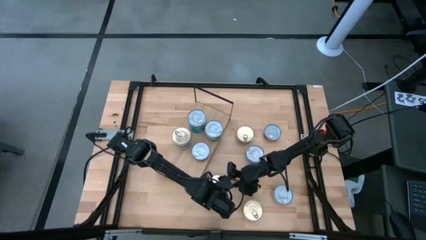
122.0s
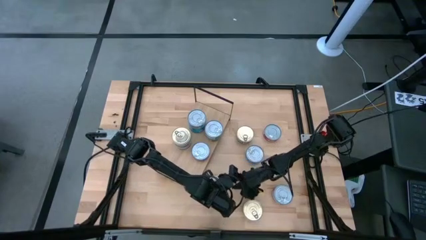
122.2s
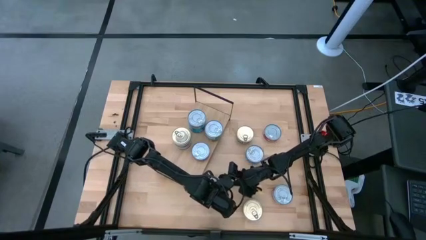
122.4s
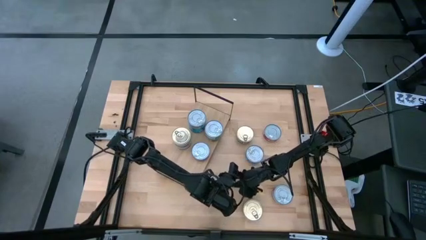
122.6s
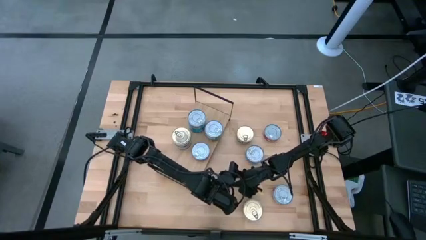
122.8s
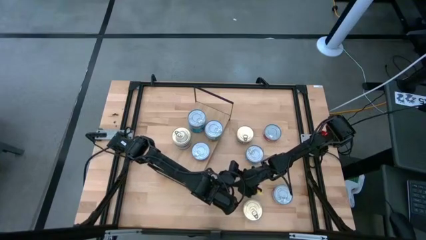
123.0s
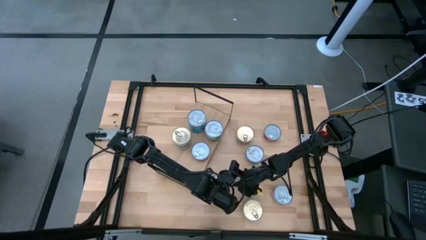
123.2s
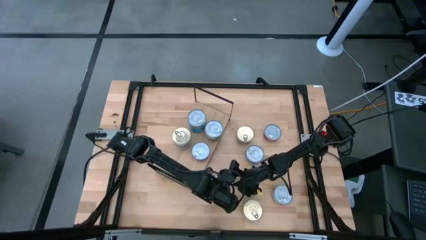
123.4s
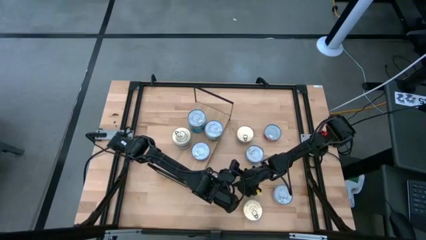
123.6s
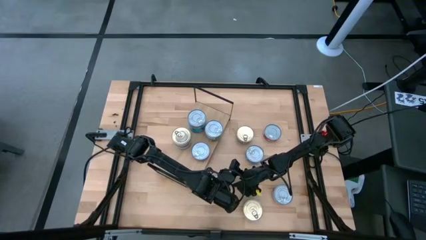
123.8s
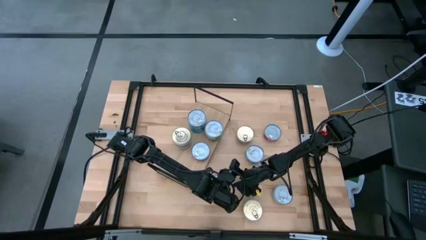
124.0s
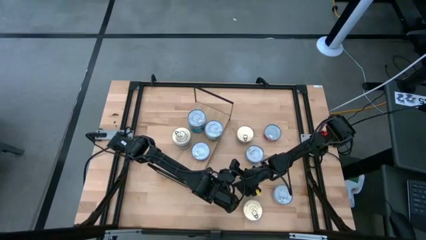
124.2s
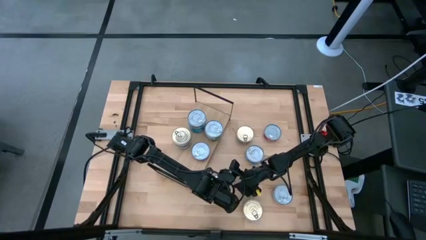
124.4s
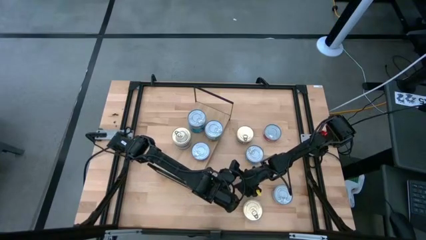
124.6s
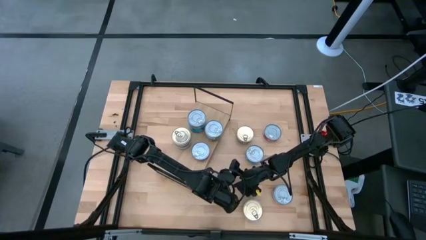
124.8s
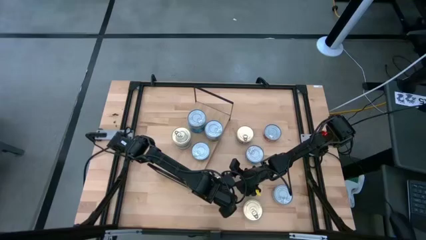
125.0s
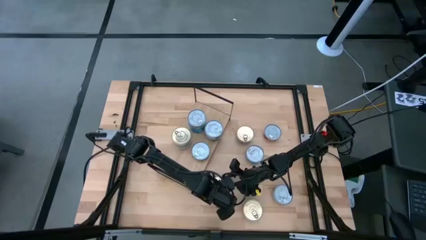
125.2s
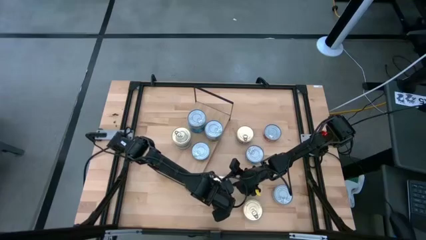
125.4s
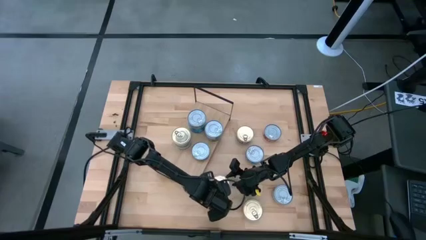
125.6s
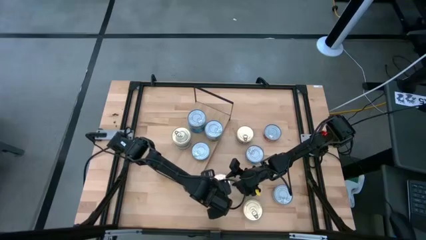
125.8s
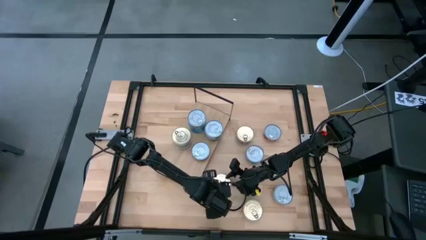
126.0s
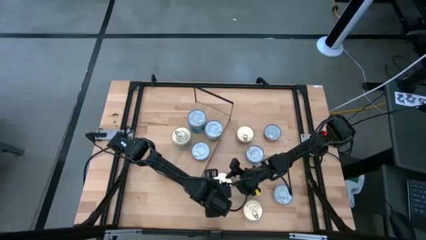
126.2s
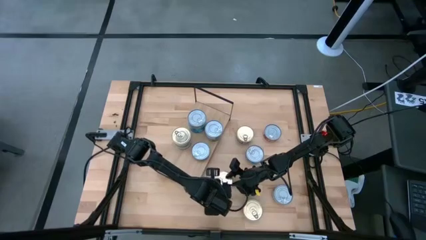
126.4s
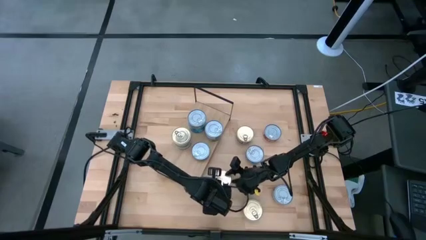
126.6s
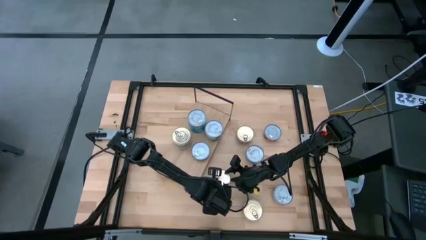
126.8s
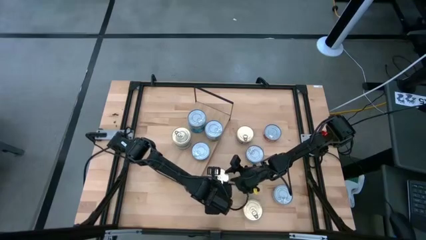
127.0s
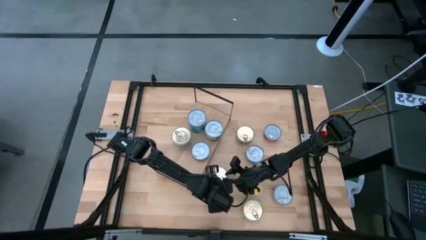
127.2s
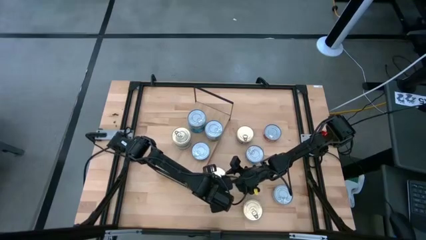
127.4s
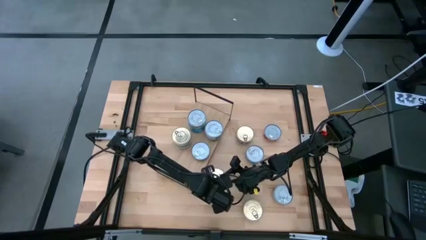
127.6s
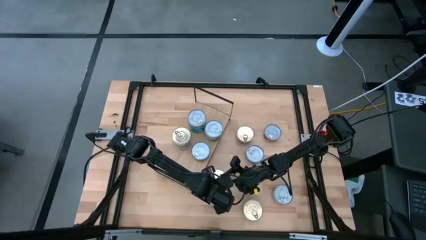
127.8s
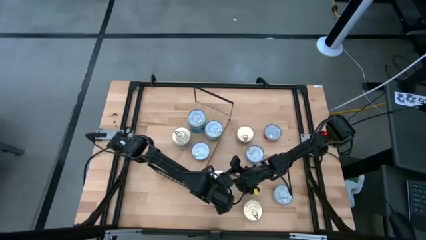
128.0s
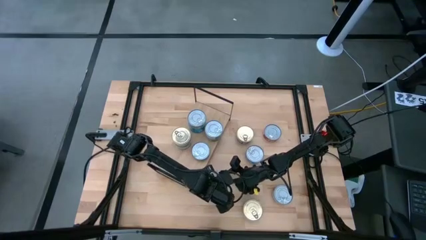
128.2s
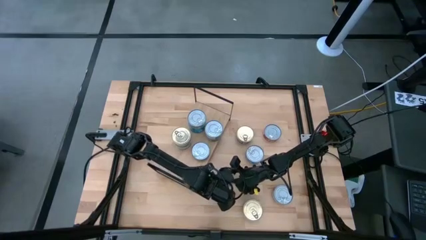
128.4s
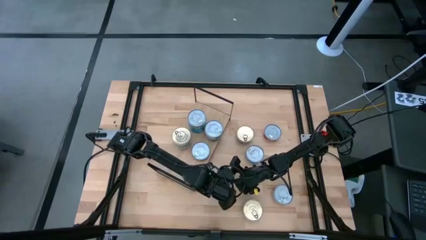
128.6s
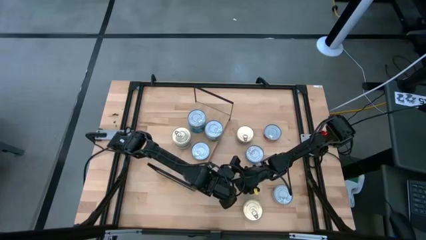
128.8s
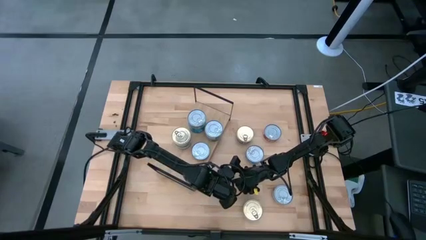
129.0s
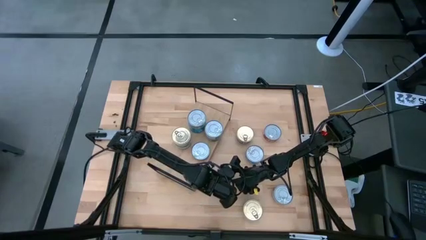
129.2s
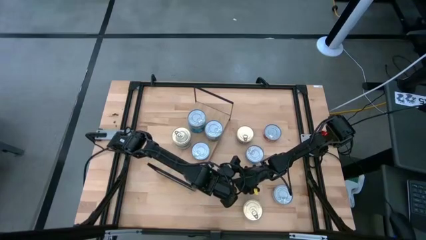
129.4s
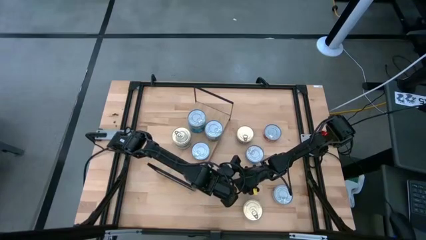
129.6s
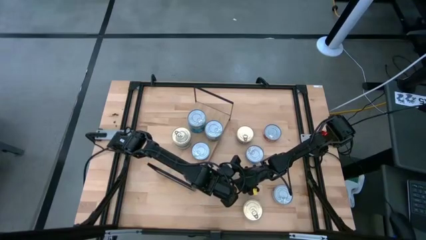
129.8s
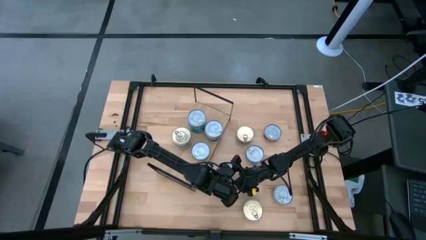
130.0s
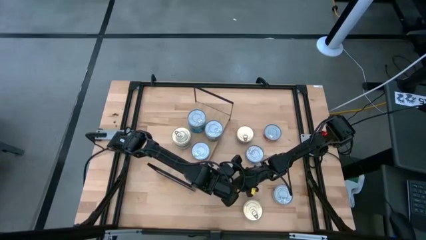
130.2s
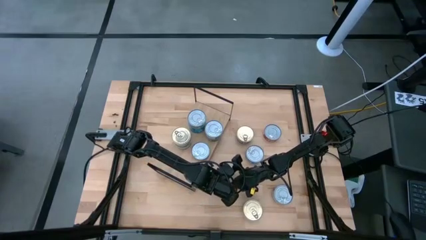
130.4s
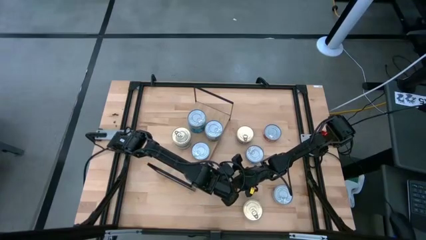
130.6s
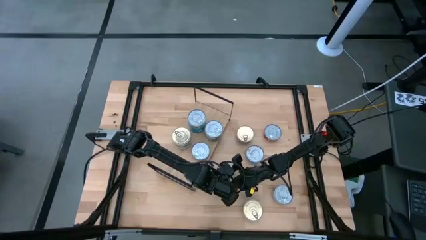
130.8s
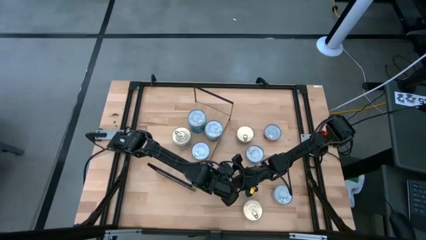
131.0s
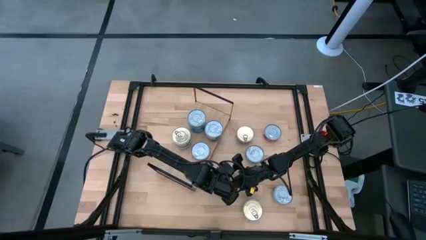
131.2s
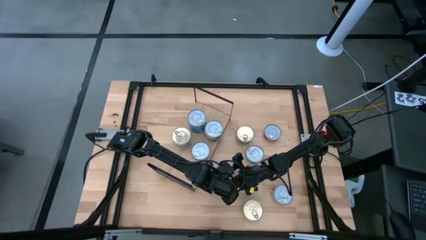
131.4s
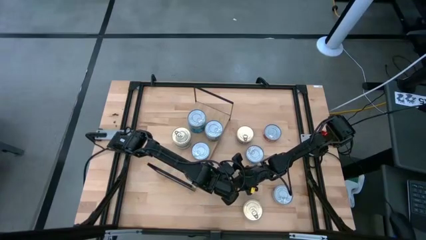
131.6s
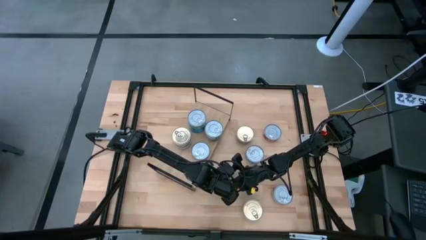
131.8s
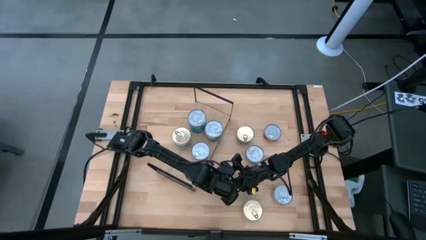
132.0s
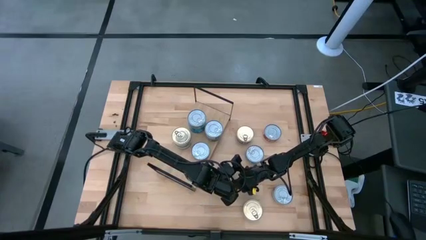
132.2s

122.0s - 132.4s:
Task: Stack canned seafood by type on shelf
Stack the blue tuna can on top of the blue tuna can on the shelf

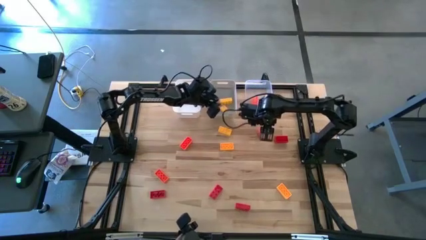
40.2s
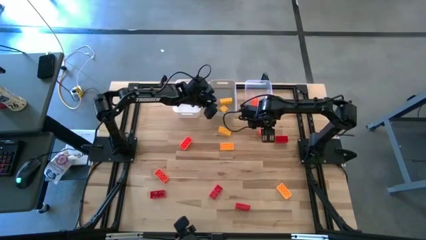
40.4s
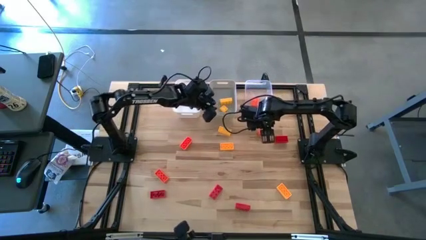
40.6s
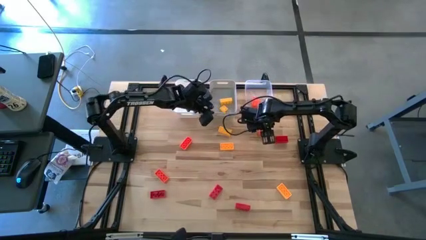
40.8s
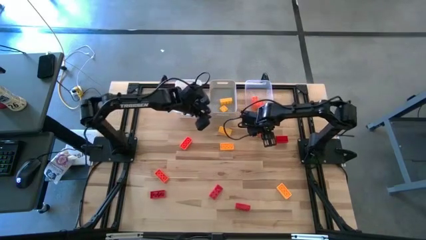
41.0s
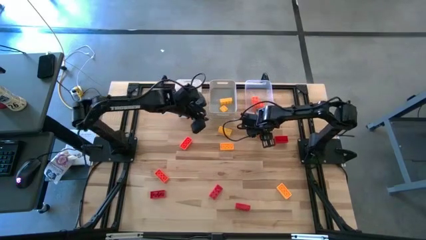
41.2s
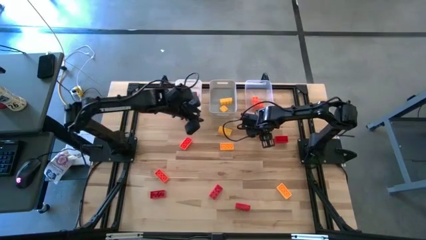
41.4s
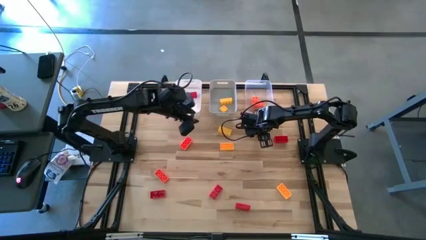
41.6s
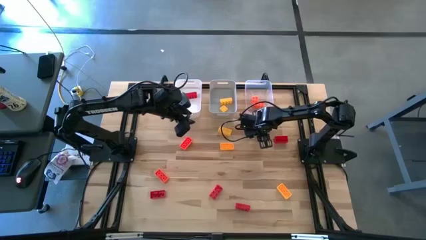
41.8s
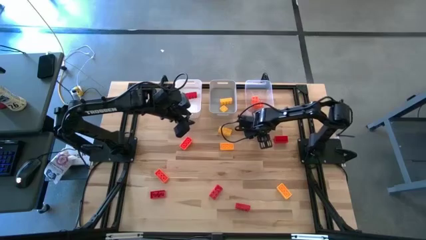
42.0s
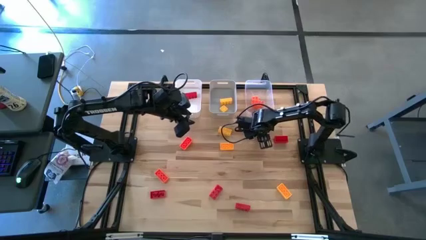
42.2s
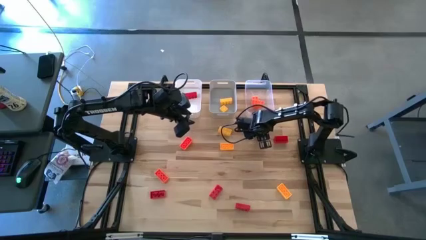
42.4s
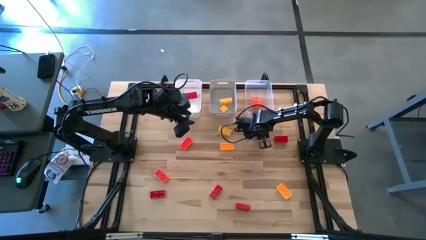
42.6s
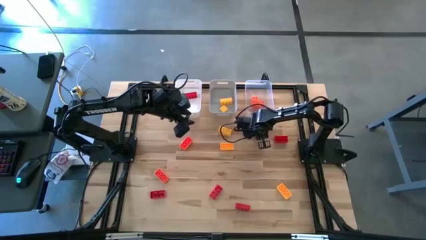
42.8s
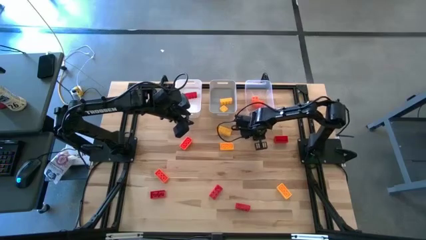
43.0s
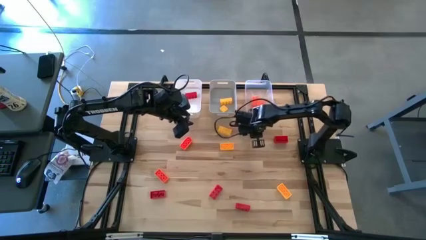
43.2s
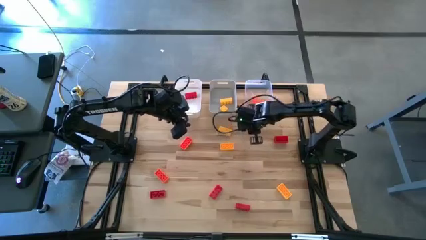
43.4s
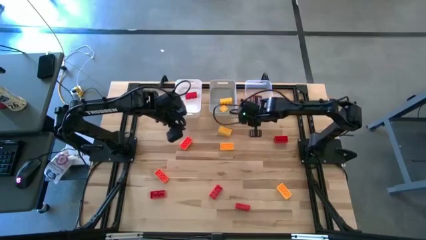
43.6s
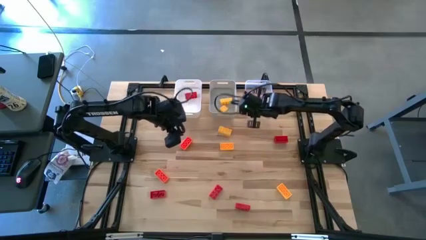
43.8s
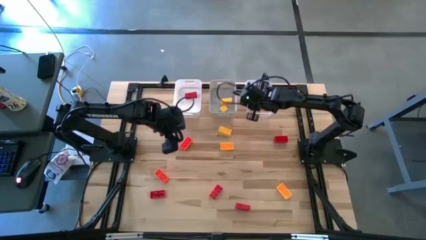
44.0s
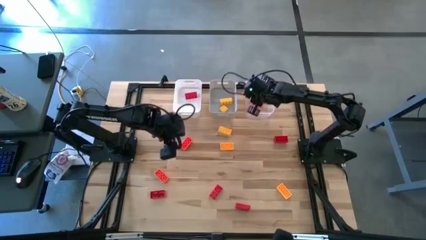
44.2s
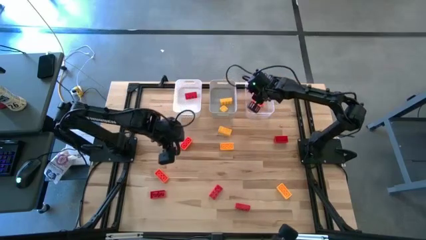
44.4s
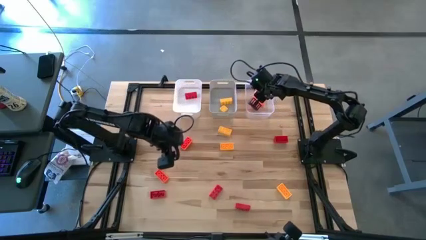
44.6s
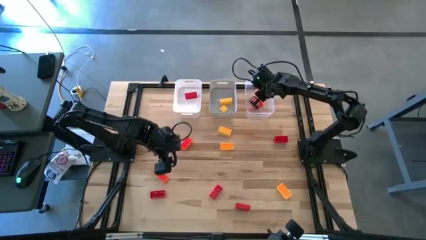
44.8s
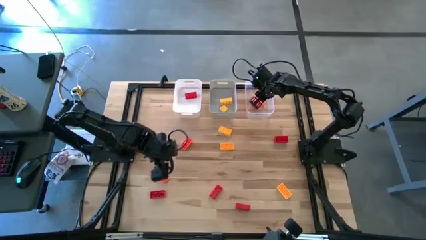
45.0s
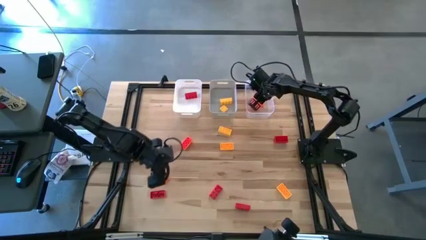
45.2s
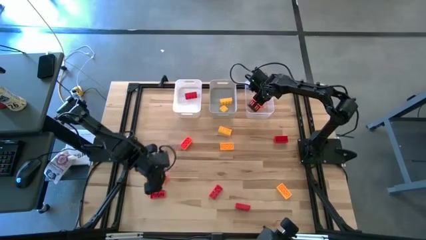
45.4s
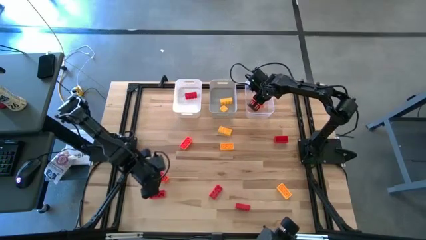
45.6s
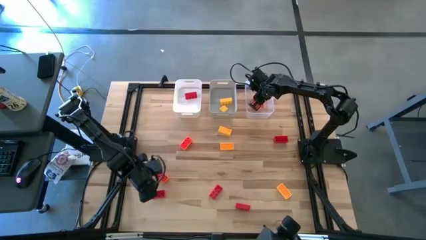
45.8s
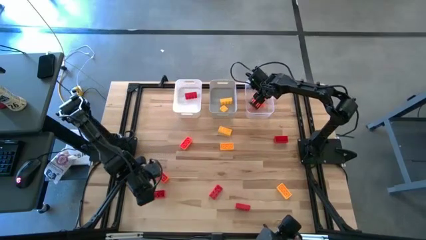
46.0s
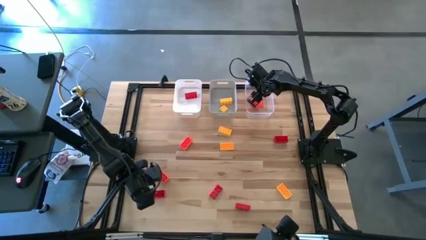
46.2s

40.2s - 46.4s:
Task: Sort & place blocks by color
Put the orange game piece into the transparent bin
